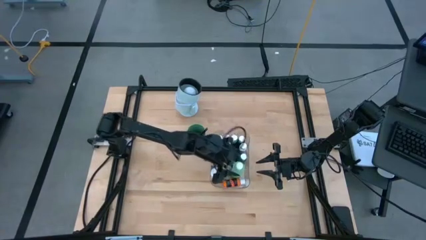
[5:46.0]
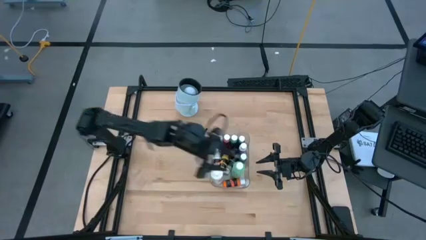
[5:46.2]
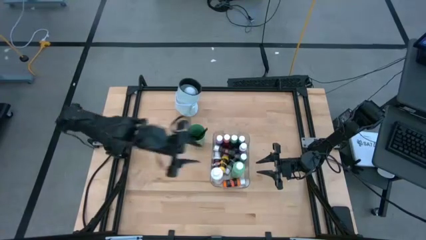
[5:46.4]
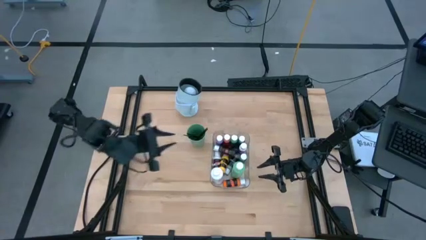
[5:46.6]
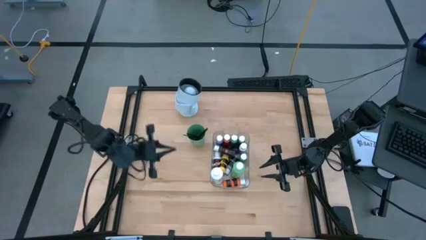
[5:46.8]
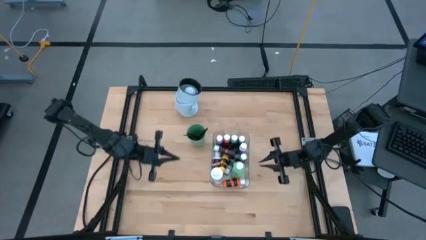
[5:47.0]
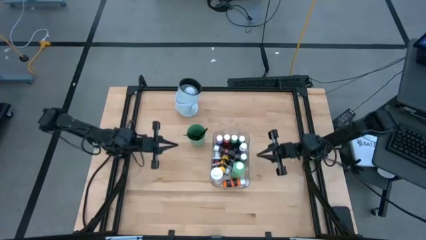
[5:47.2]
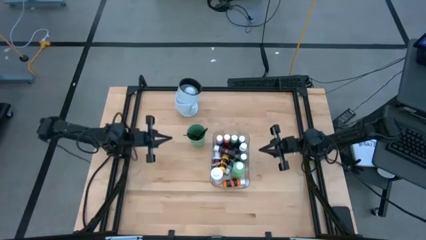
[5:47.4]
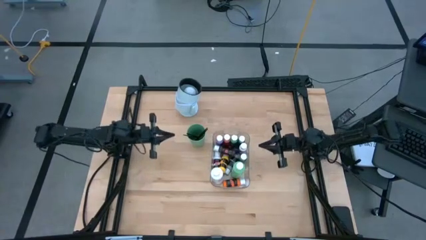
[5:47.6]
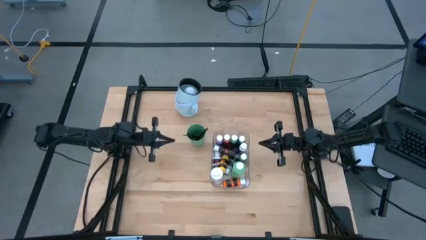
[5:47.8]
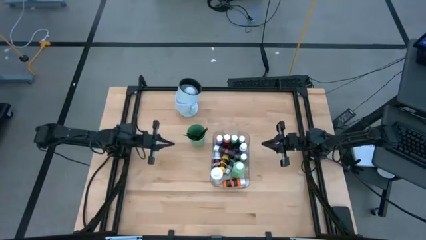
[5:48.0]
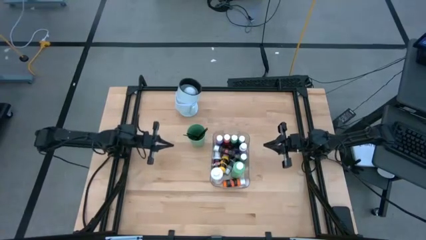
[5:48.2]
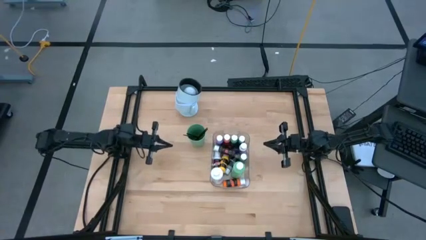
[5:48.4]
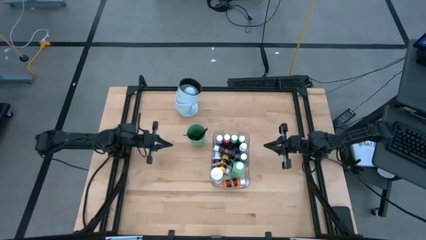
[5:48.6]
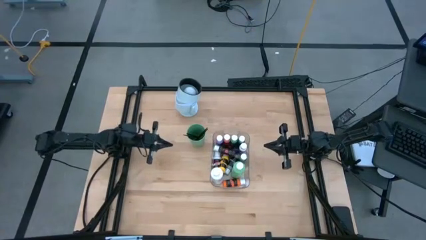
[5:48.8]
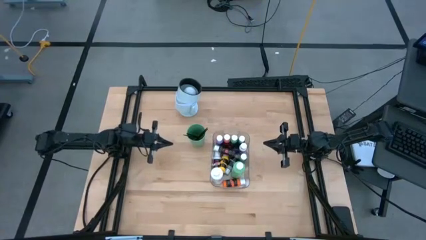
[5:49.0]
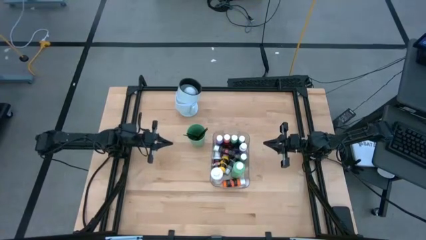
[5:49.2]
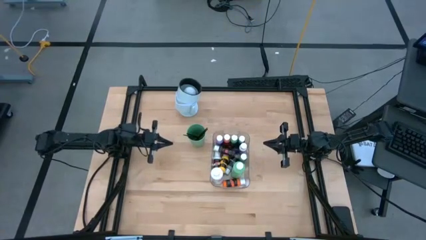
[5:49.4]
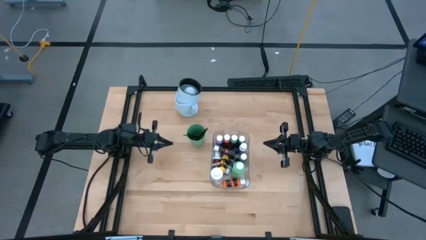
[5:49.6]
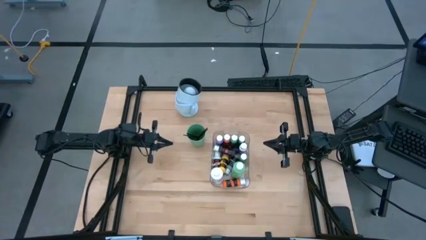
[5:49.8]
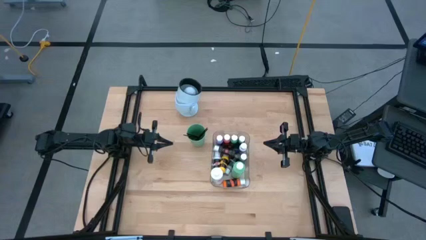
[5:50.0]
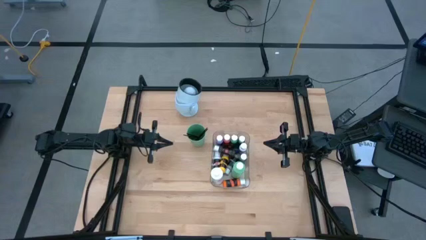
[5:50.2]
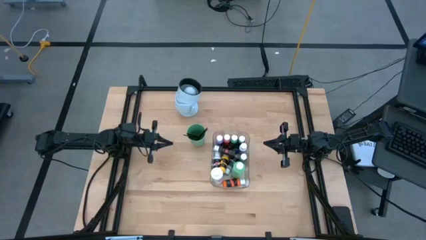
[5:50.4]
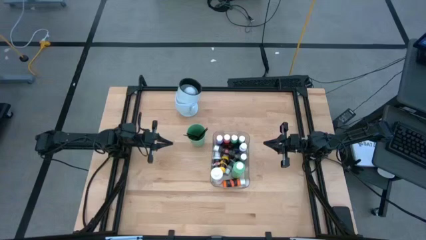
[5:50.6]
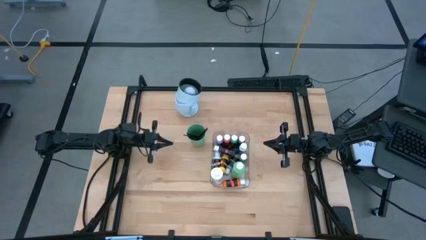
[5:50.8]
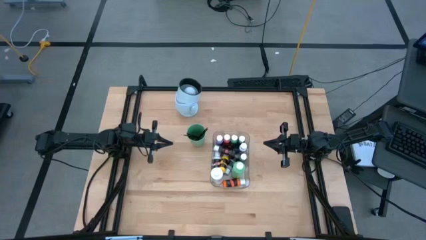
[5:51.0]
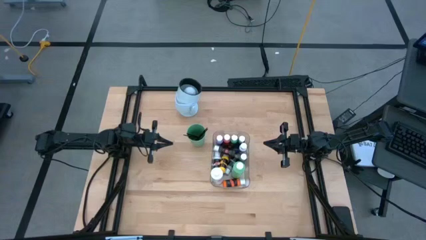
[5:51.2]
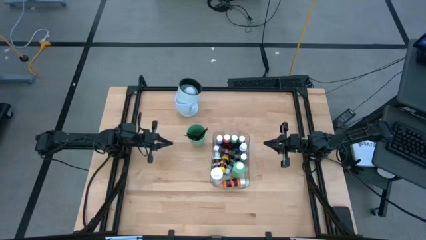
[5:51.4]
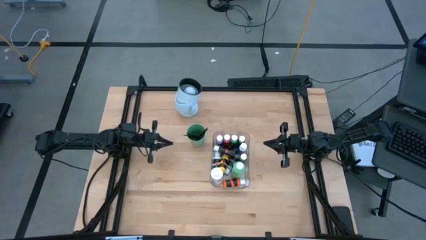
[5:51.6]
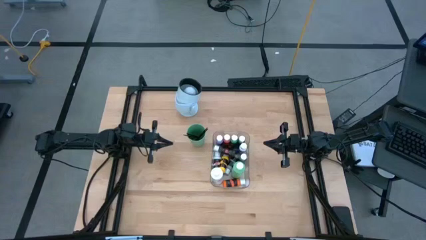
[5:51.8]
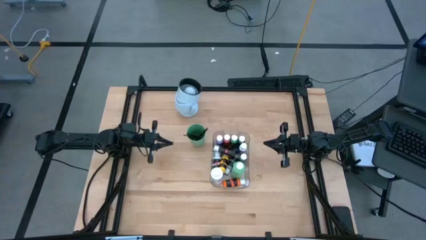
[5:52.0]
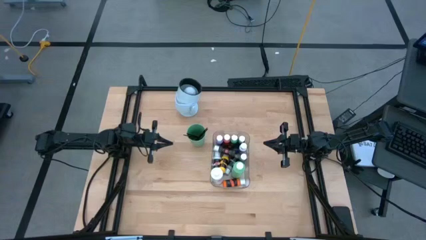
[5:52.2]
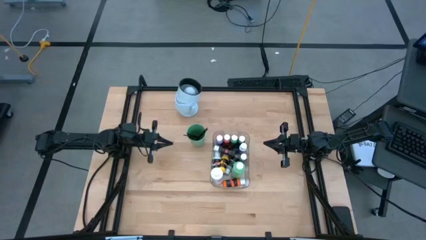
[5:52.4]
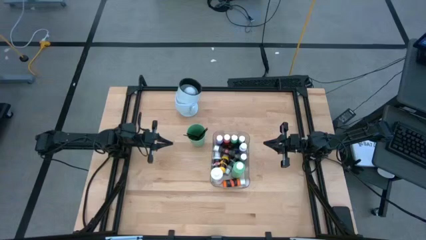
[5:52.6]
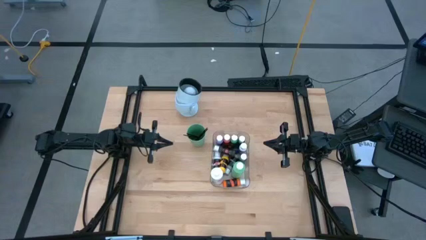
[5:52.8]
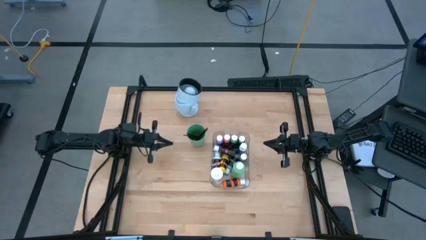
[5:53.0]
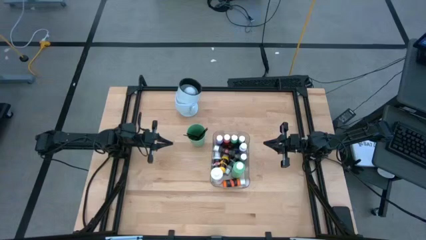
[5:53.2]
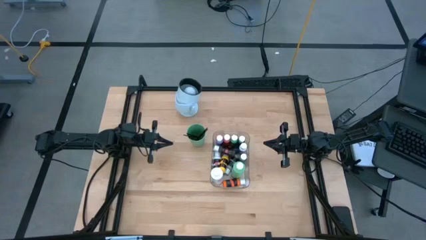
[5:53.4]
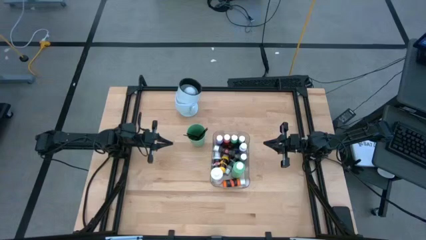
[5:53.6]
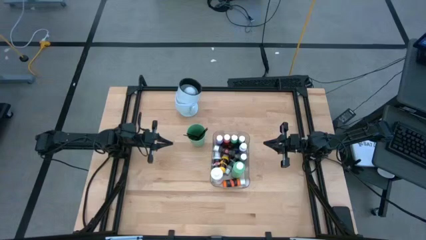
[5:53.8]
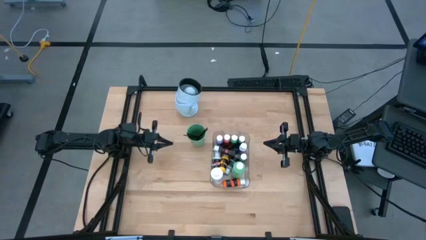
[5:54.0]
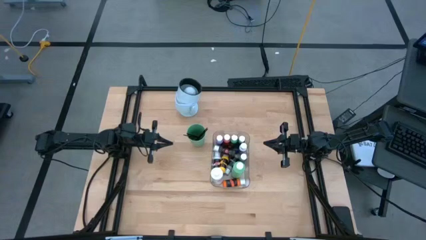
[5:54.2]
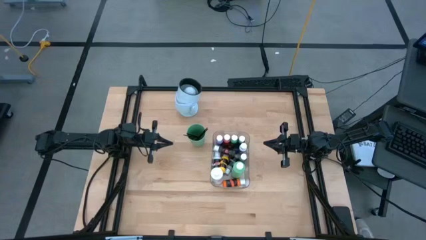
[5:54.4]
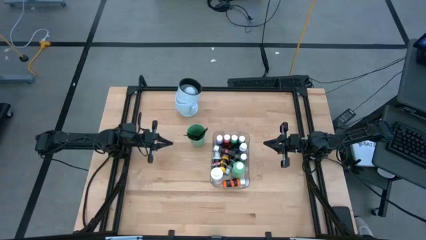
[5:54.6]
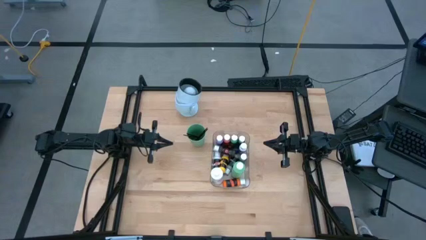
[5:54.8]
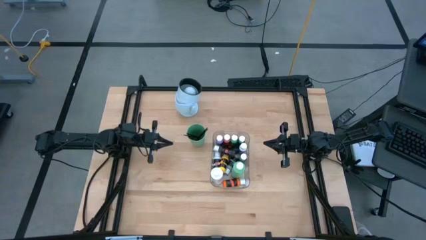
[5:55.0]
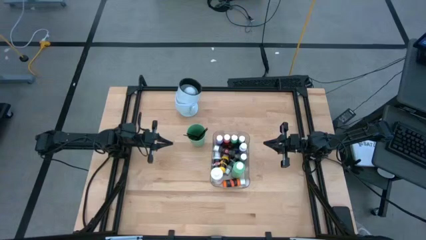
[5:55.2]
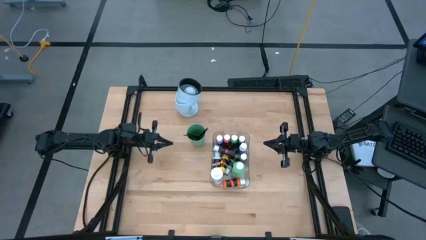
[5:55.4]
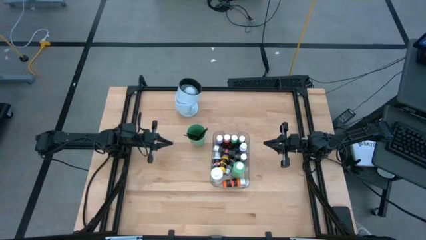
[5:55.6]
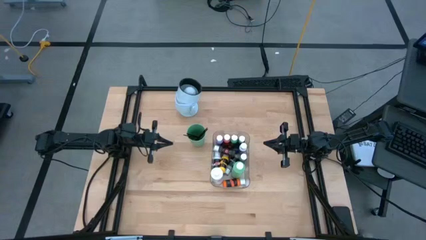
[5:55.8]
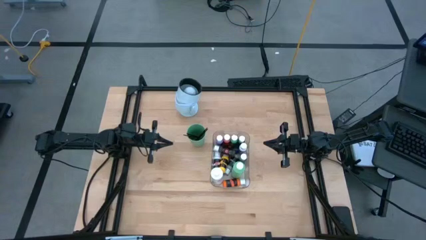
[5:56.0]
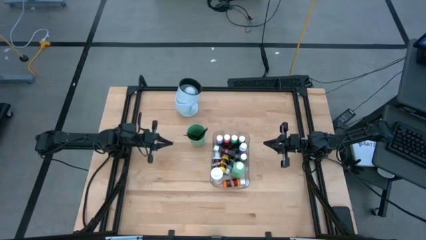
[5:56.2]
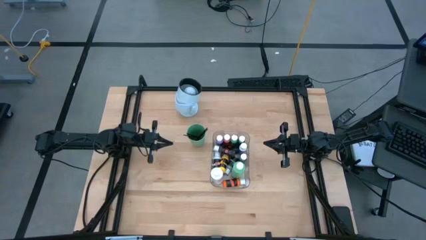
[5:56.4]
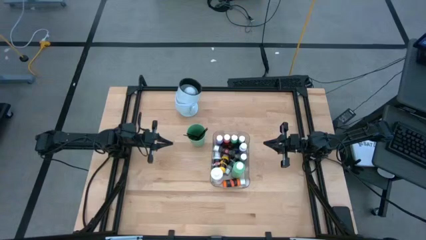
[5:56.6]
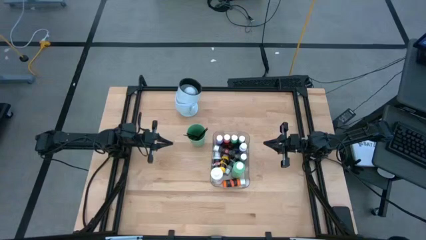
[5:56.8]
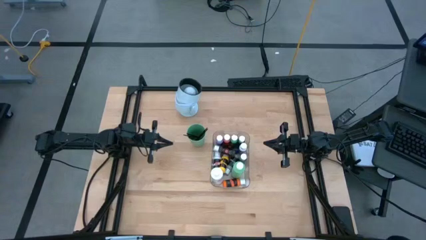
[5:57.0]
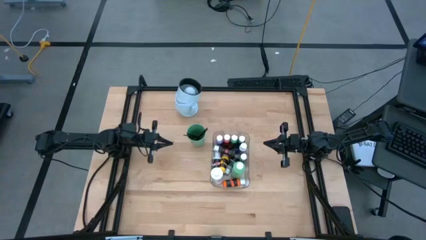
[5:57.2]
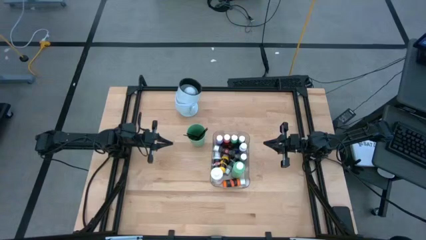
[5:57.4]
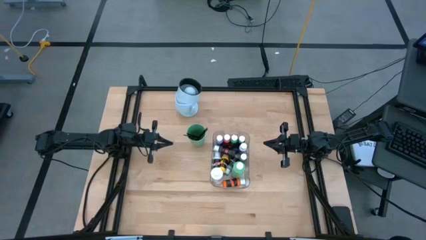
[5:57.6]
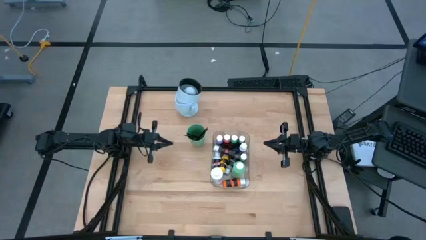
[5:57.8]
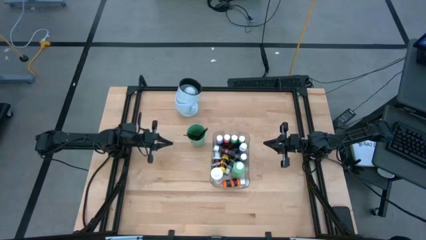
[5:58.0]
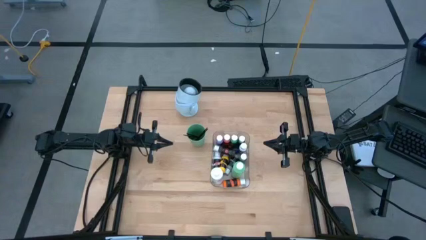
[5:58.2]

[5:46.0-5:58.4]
Task: Pick & Place Paint Supplies
Return to Home Position

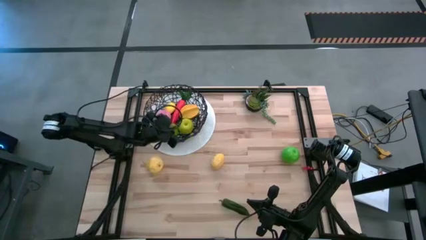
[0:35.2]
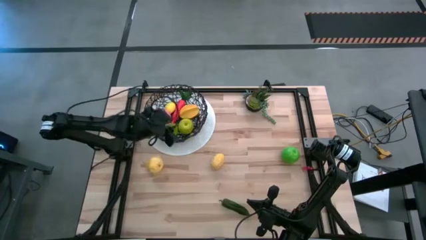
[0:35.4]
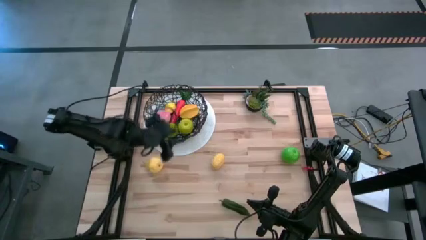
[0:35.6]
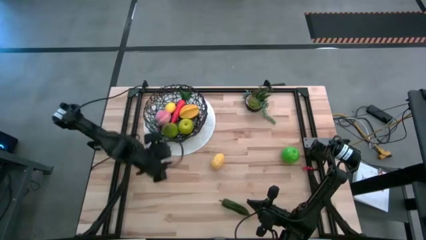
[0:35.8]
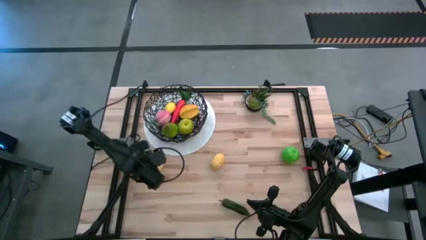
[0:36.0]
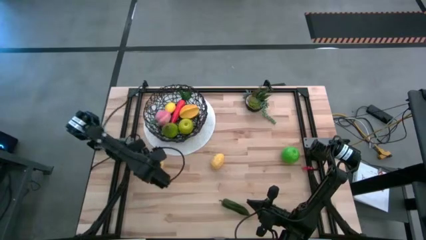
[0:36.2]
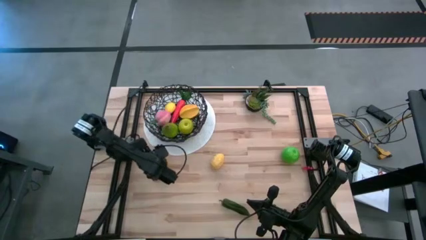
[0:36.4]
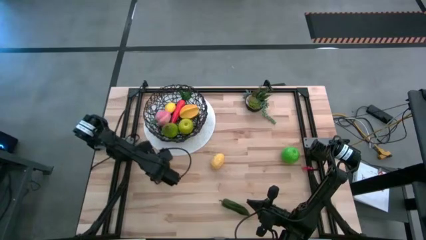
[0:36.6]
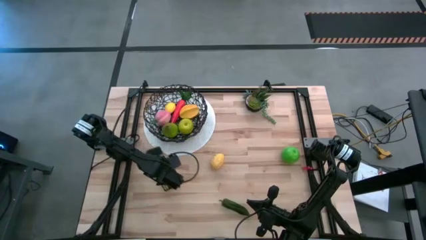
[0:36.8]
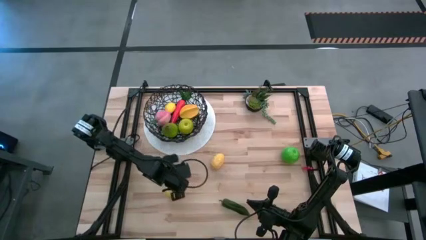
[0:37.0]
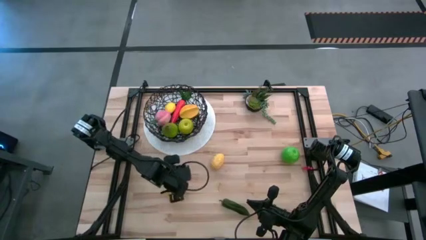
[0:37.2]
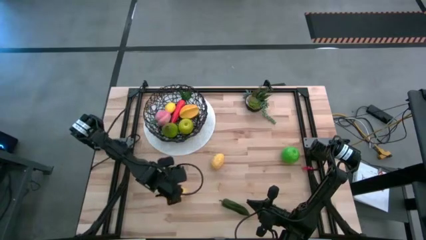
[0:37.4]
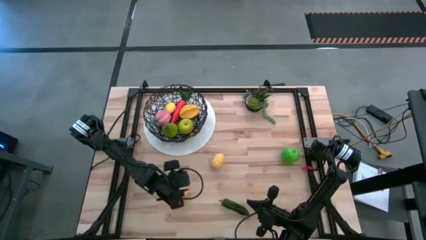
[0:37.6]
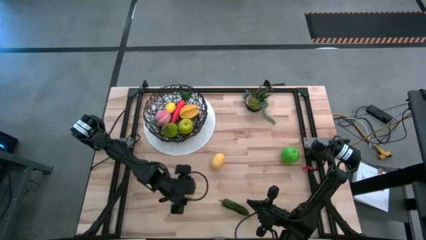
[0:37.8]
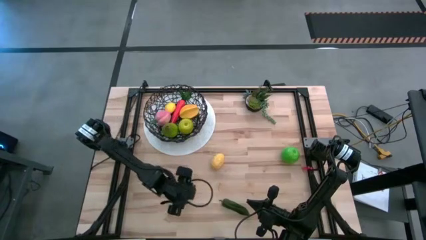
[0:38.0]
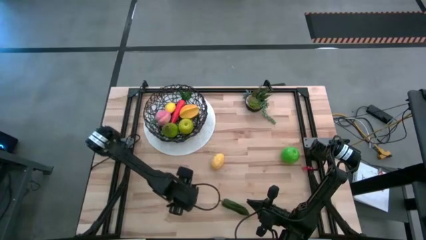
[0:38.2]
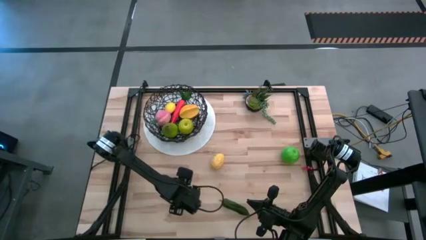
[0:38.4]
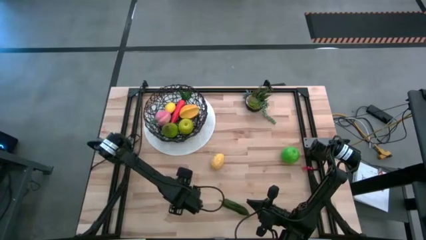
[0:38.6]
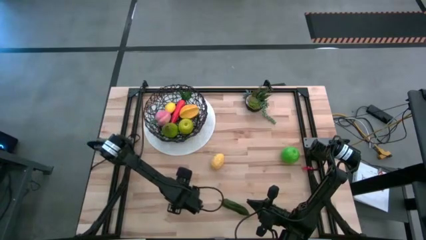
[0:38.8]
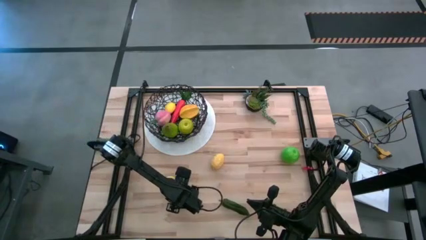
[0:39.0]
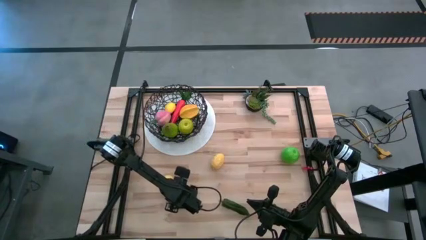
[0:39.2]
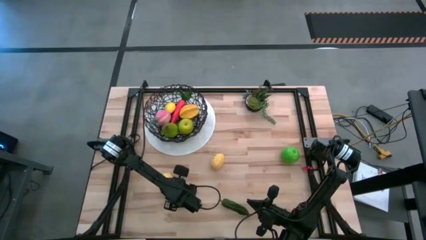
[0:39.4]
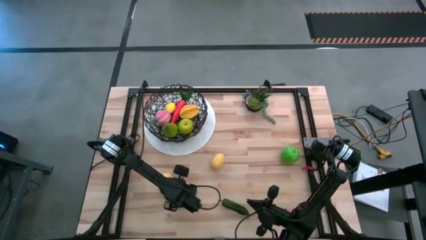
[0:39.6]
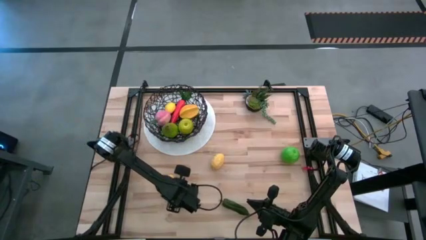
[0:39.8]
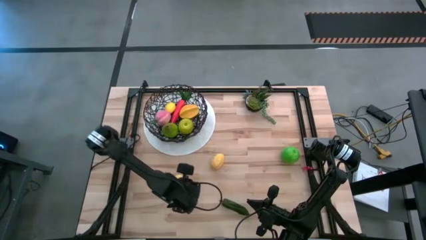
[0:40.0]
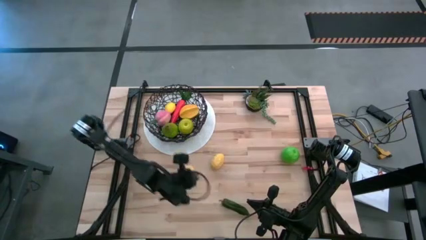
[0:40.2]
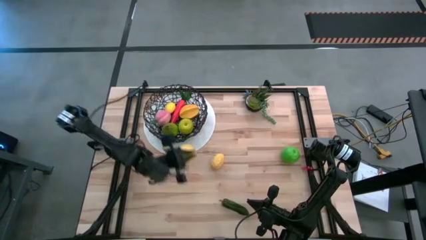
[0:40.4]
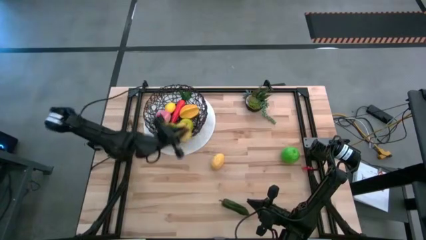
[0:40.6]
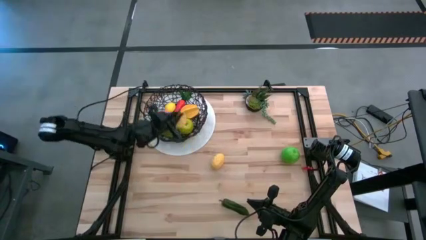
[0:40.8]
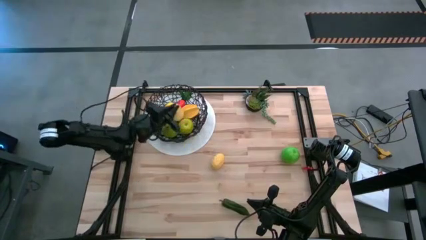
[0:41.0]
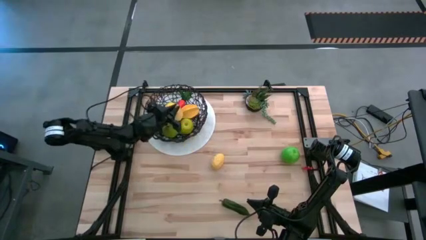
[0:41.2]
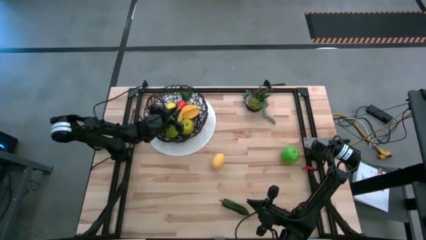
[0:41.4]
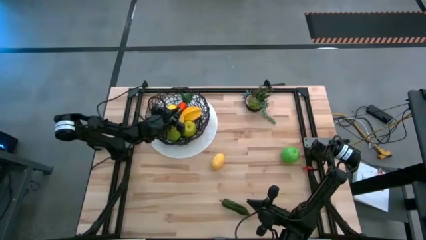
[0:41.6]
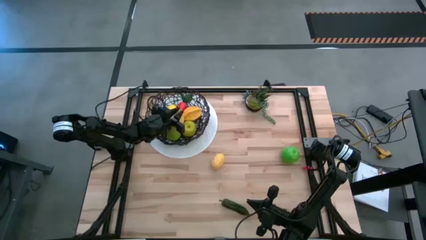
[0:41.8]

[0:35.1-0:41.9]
Task: Build produce basket
Put the yellow pear into the wire basket
